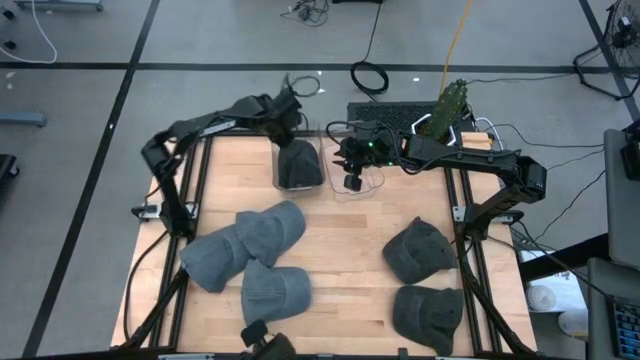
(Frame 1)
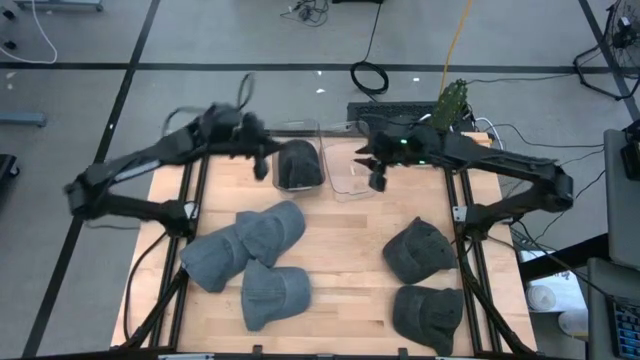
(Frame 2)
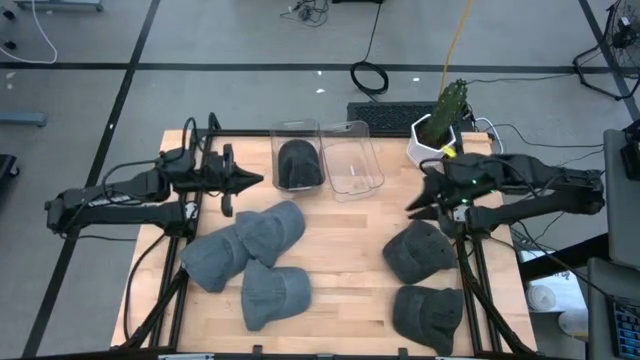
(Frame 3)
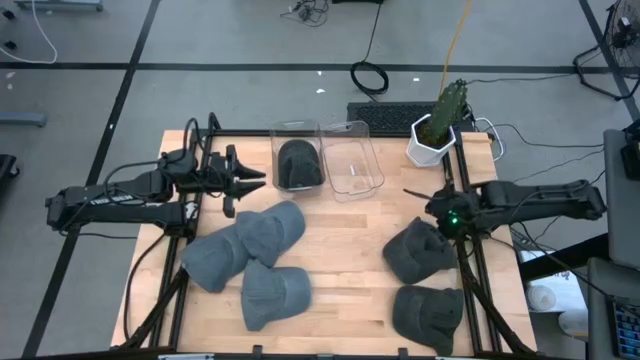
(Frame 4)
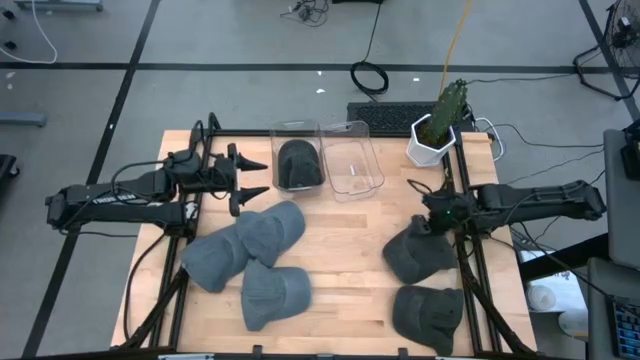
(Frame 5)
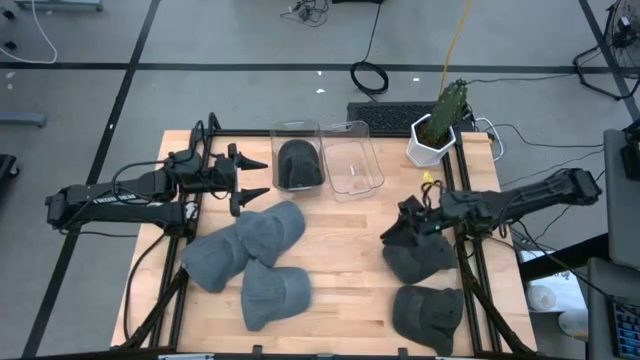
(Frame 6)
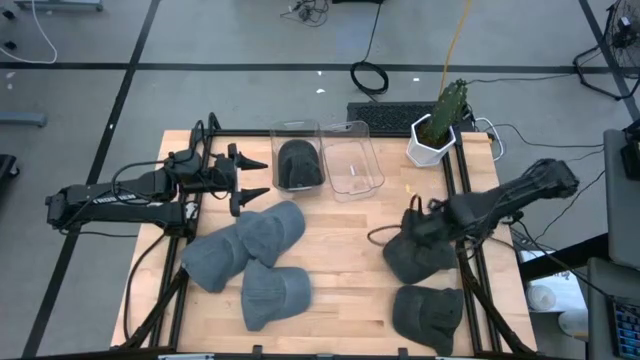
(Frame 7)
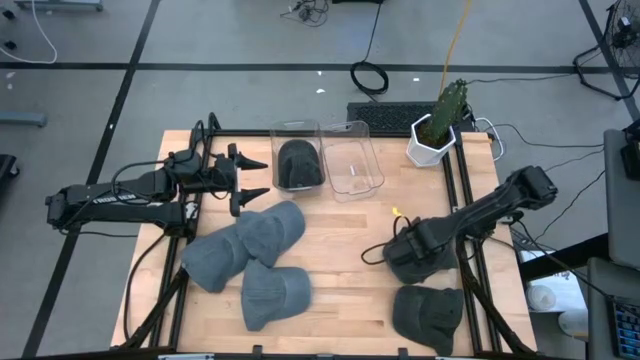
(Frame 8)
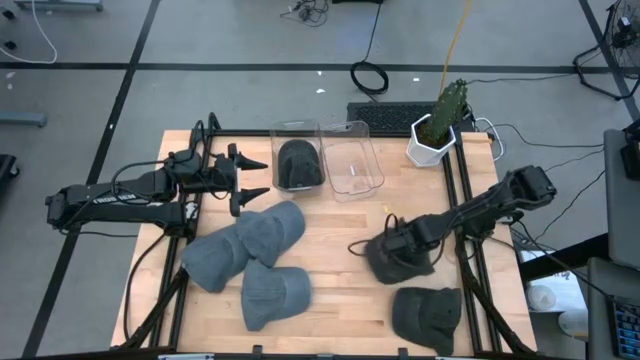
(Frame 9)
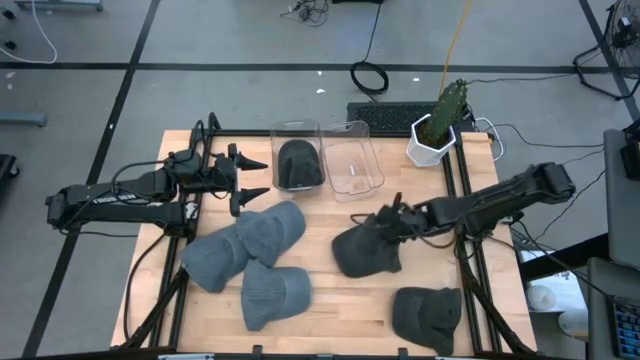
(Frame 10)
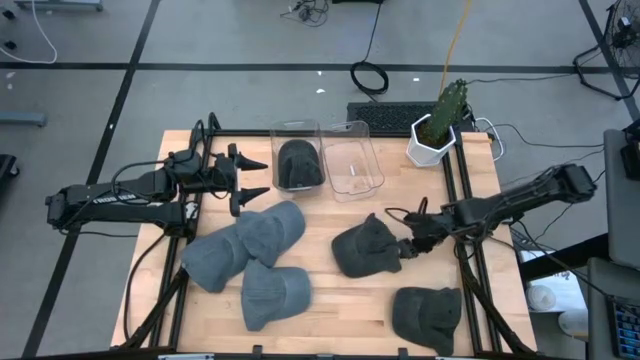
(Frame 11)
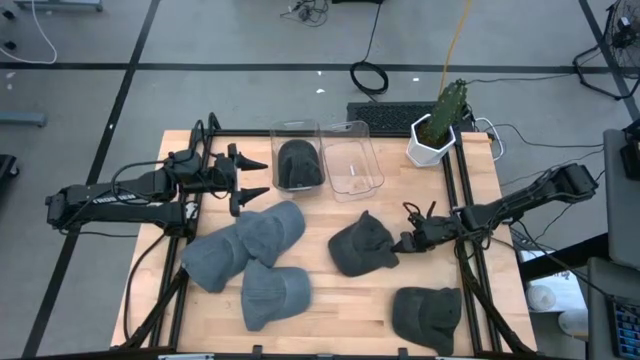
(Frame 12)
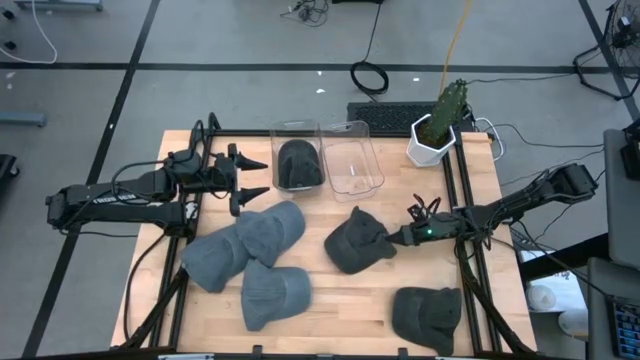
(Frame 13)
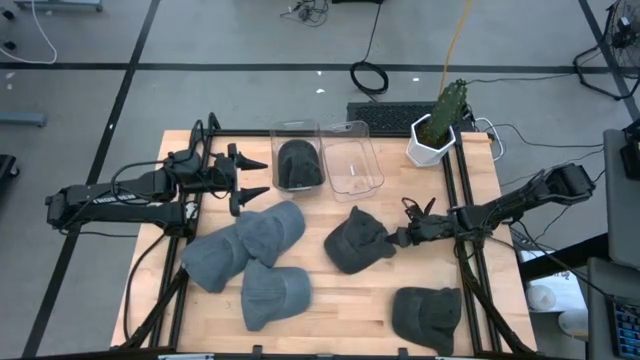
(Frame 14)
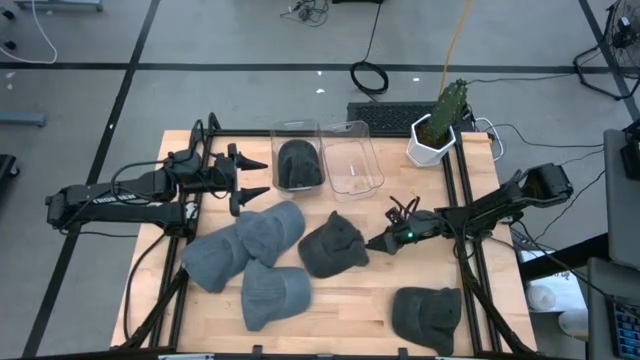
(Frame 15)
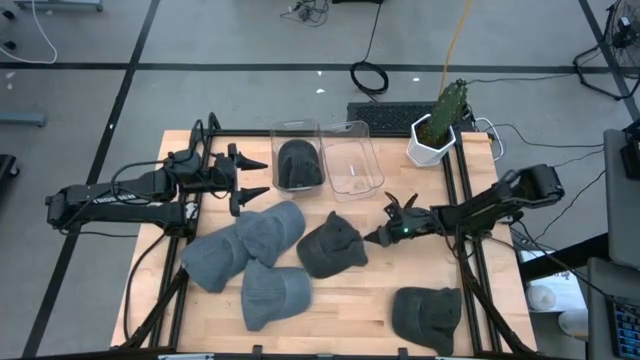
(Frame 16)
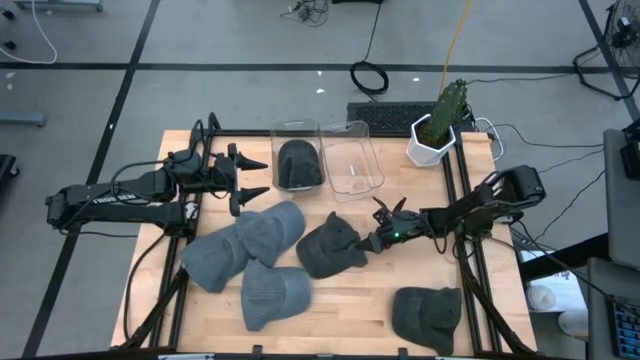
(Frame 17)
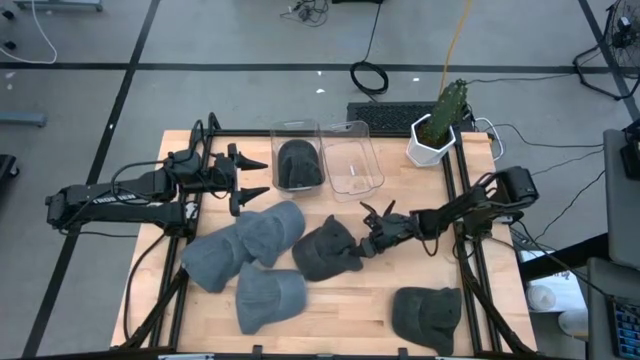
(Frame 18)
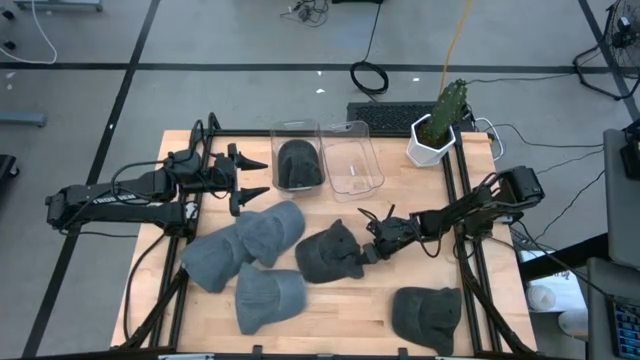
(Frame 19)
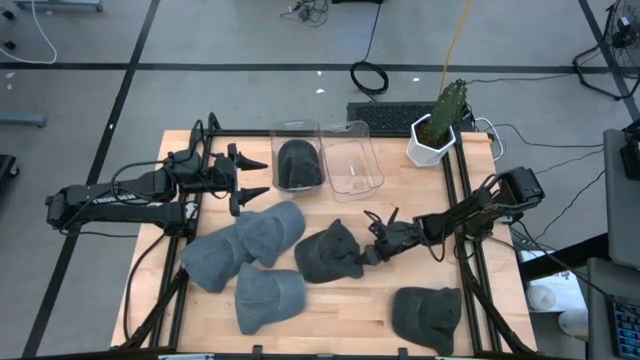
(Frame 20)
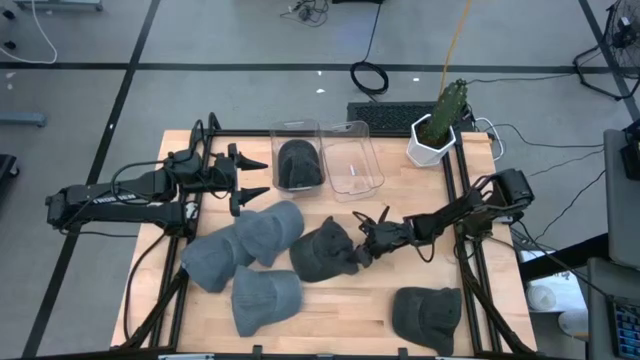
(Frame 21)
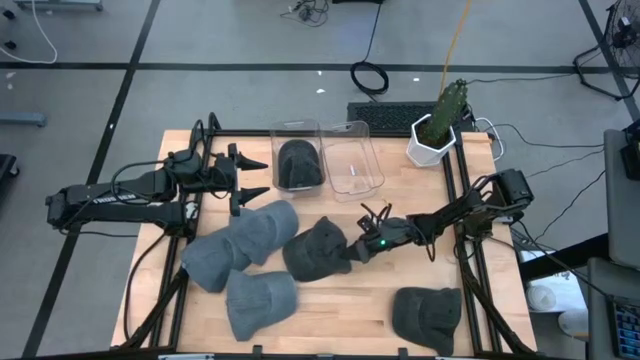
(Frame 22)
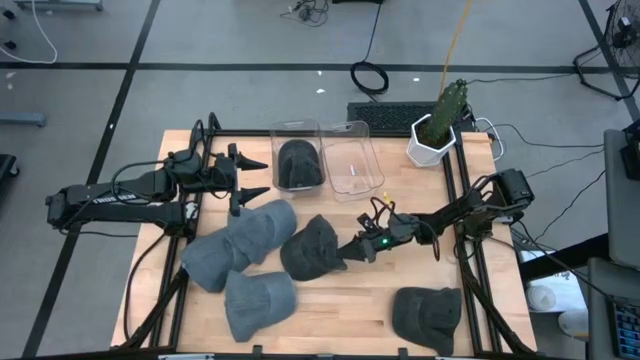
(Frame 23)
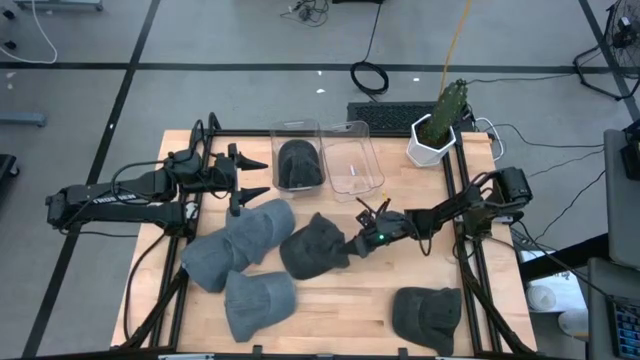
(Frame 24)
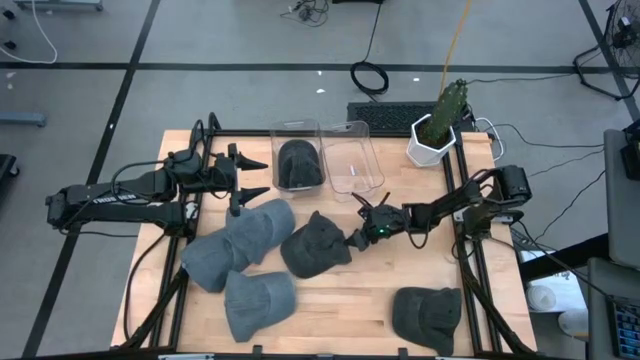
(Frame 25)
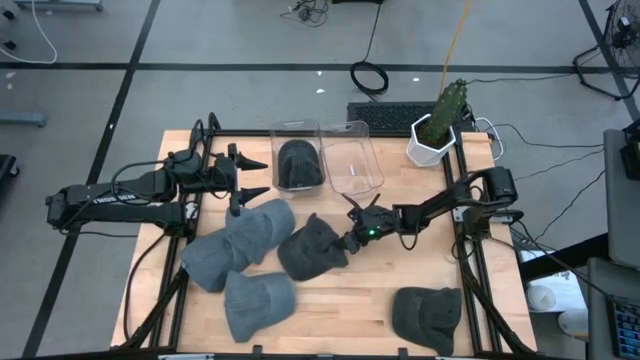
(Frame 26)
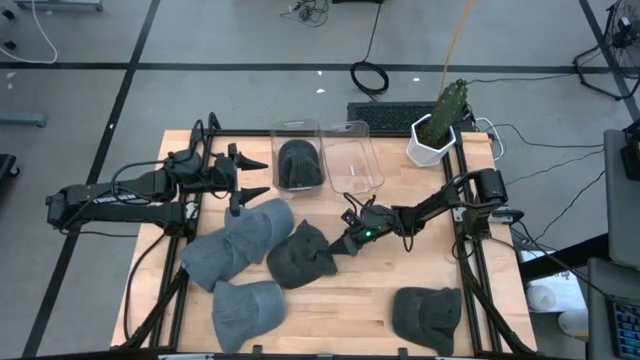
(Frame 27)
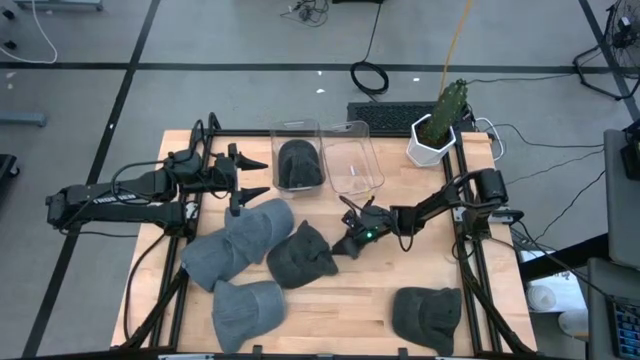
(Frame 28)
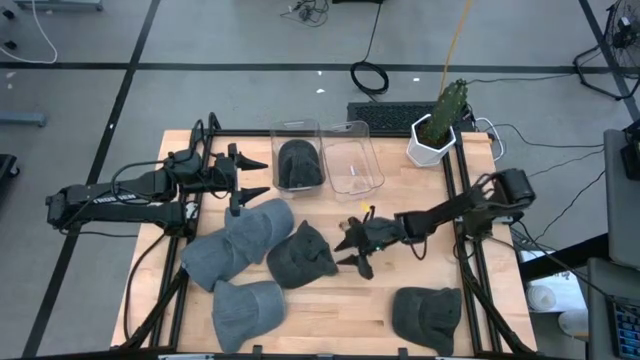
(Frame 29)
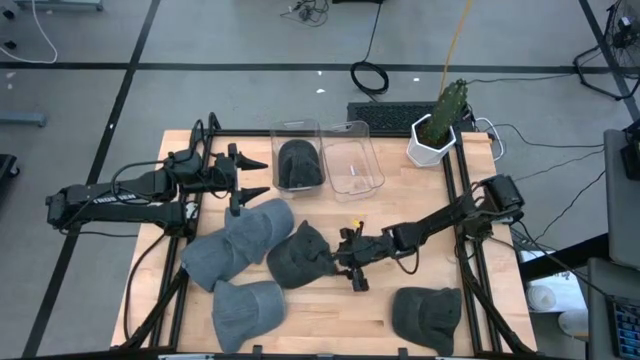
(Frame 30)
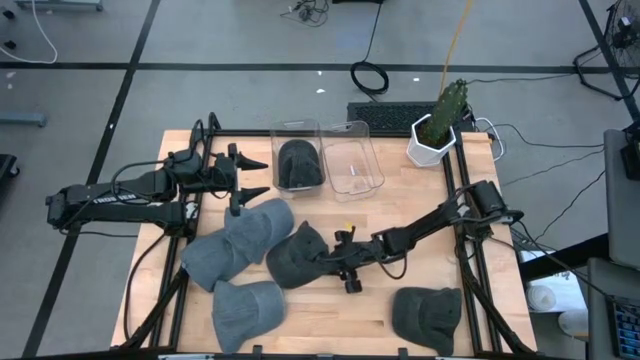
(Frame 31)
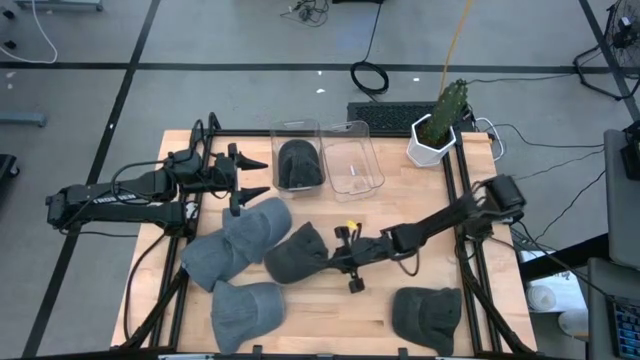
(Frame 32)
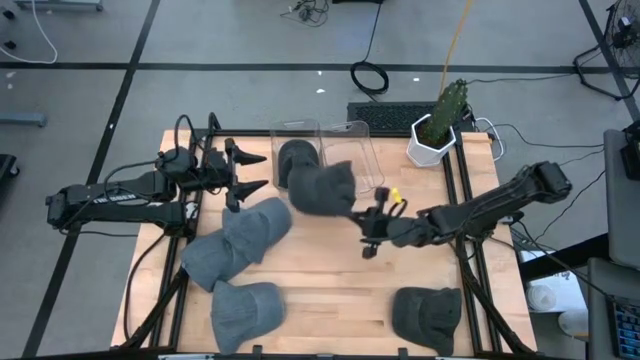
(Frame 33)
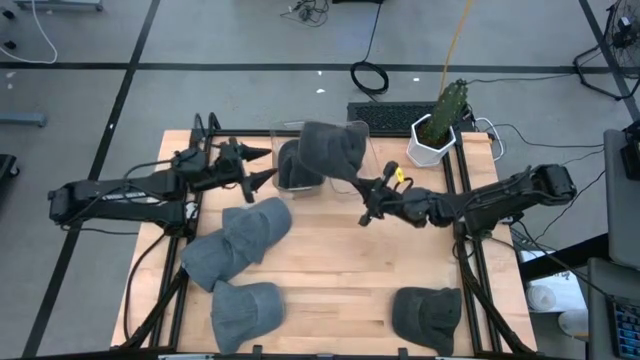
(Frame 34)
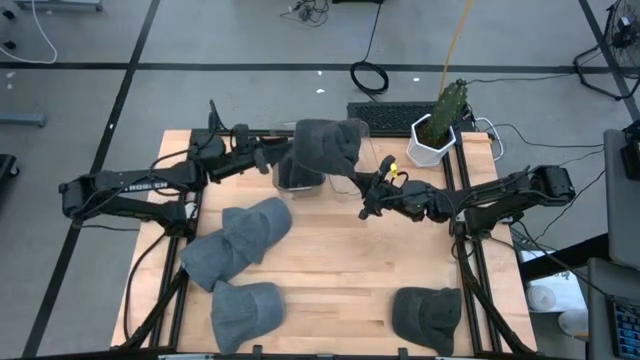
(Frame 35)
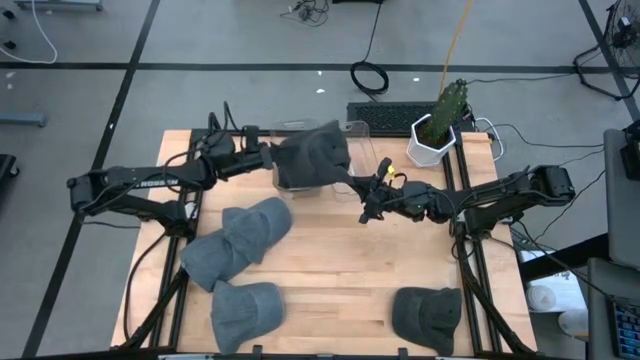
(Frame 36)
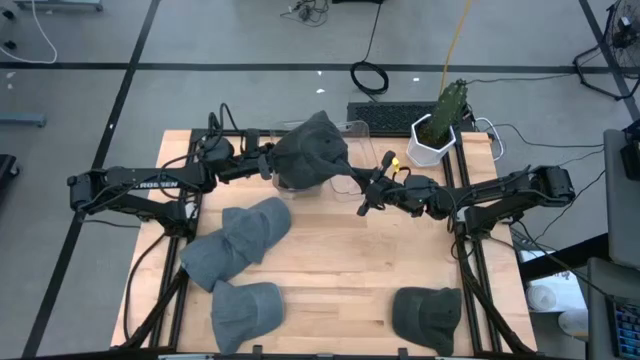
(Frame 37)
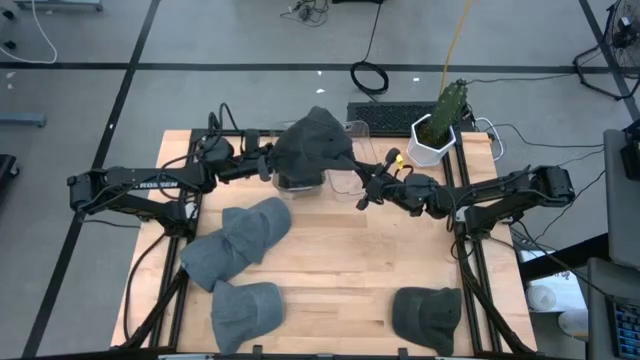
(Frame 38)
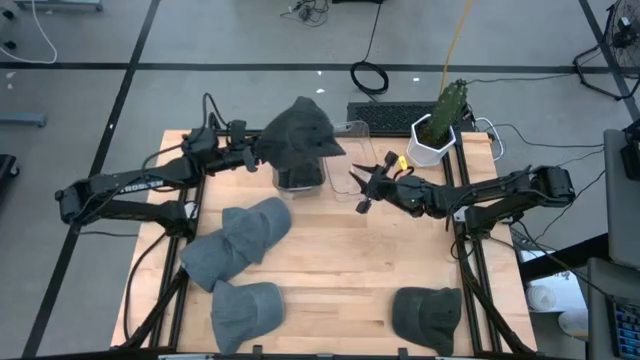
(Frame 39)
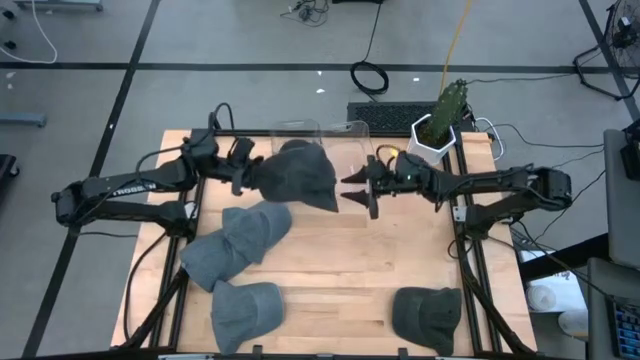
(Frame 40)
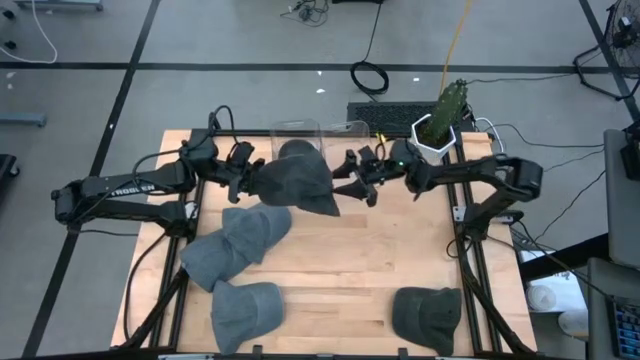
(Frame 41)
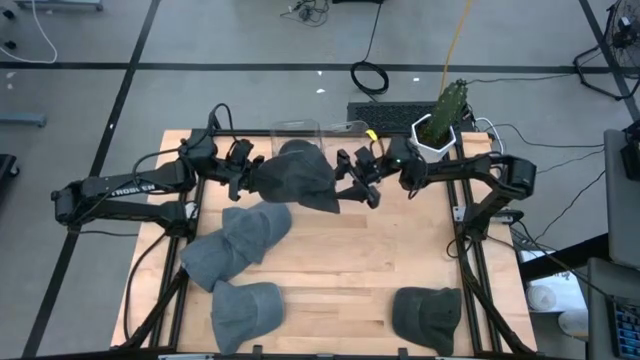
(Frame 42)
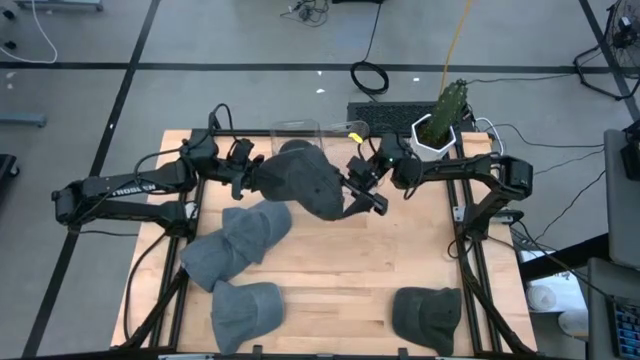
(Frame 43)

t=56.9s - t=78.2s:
Task: Pick & Place hat
Put the top black cap into the left transparent bin
